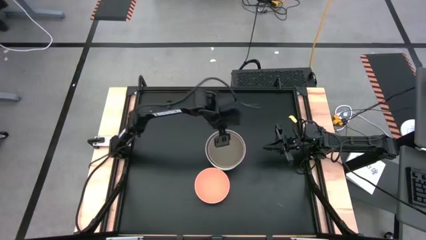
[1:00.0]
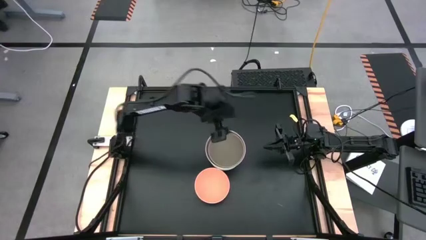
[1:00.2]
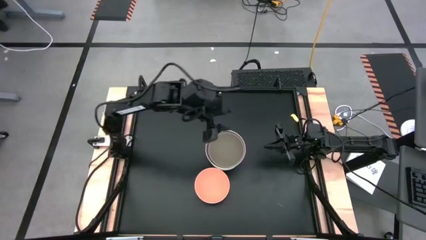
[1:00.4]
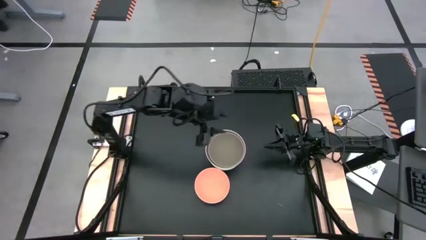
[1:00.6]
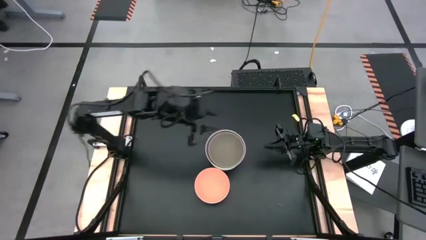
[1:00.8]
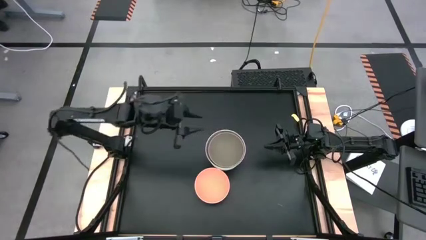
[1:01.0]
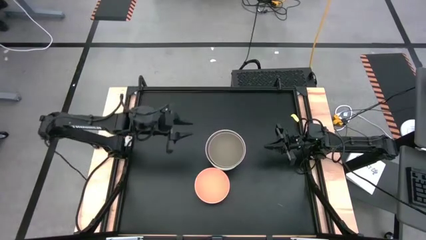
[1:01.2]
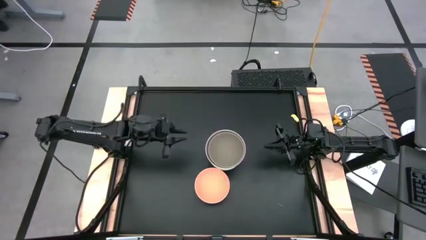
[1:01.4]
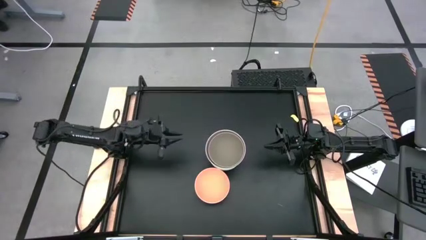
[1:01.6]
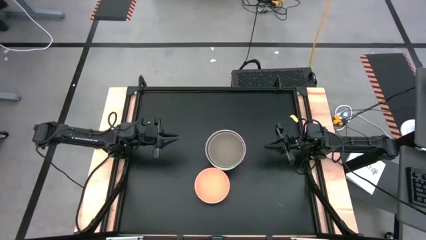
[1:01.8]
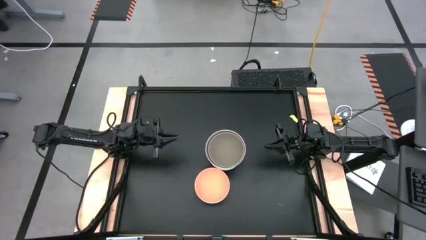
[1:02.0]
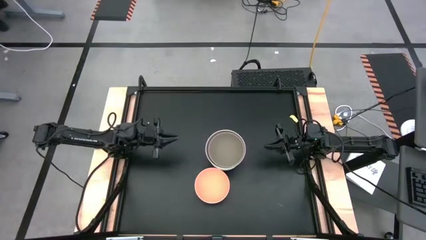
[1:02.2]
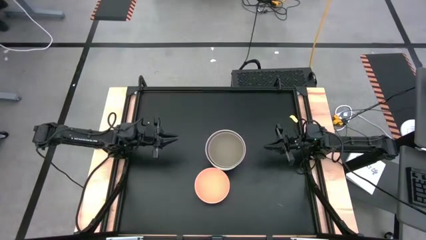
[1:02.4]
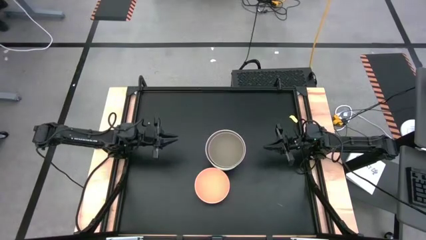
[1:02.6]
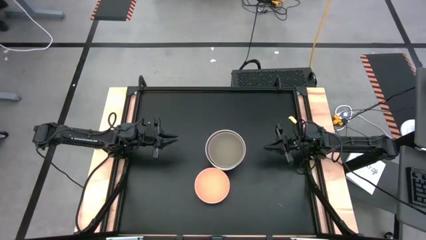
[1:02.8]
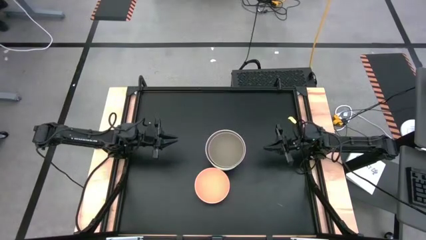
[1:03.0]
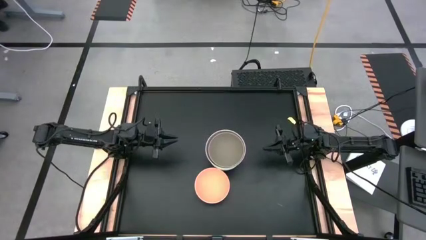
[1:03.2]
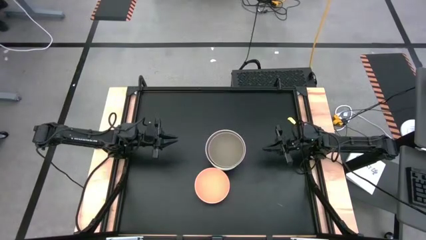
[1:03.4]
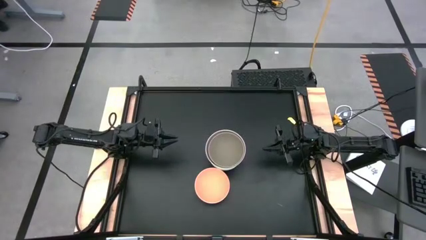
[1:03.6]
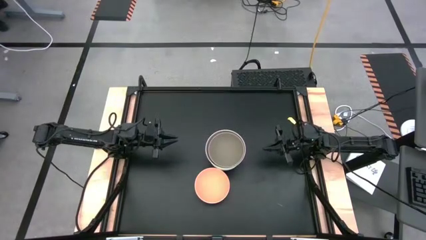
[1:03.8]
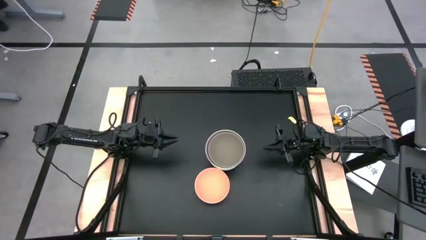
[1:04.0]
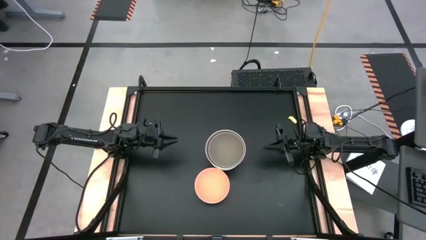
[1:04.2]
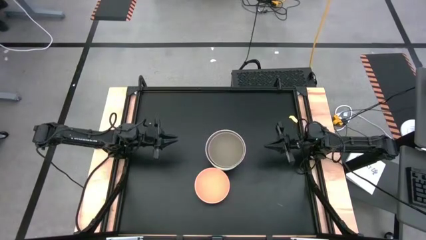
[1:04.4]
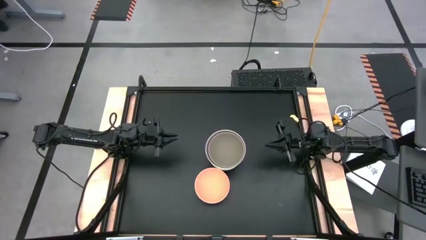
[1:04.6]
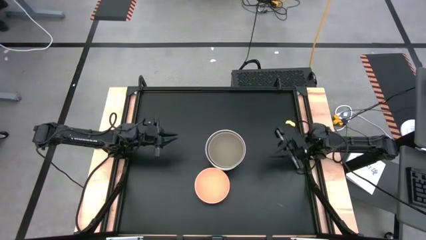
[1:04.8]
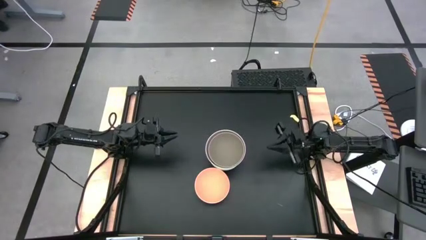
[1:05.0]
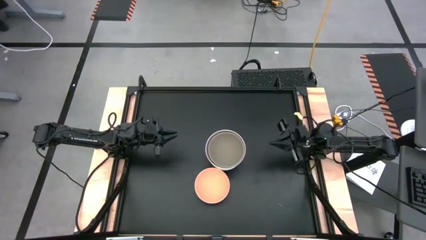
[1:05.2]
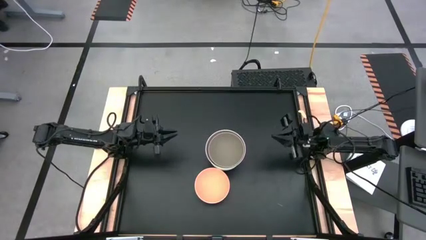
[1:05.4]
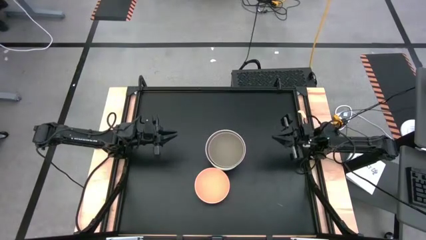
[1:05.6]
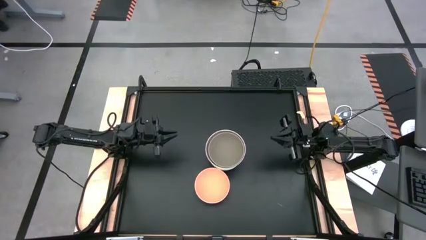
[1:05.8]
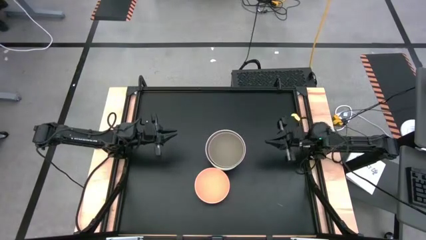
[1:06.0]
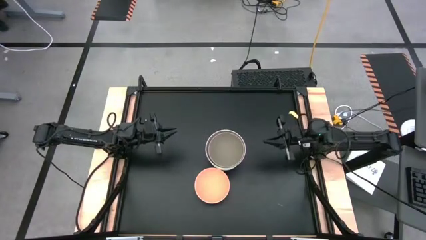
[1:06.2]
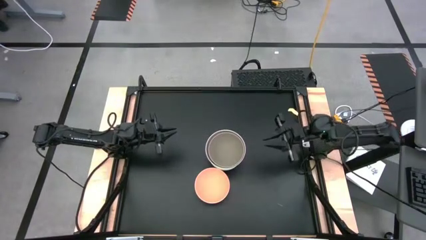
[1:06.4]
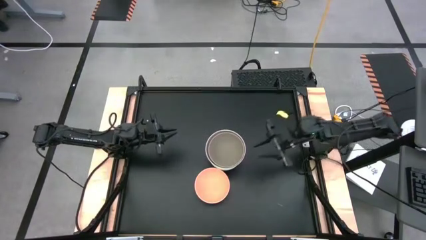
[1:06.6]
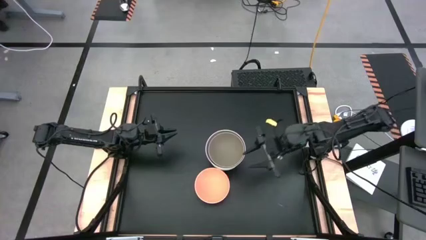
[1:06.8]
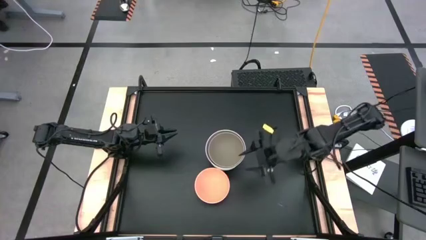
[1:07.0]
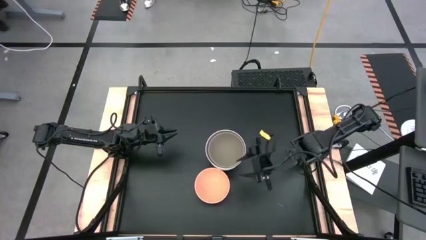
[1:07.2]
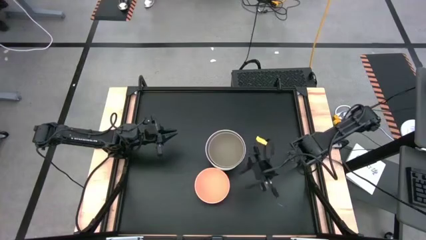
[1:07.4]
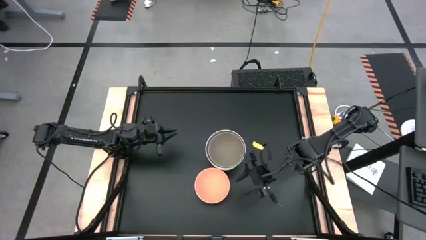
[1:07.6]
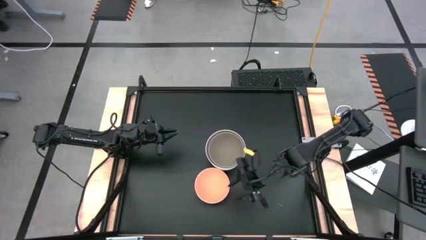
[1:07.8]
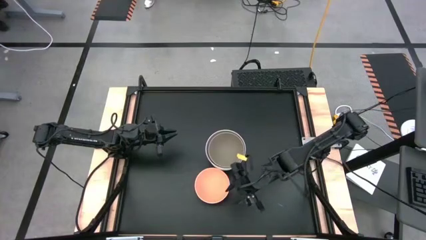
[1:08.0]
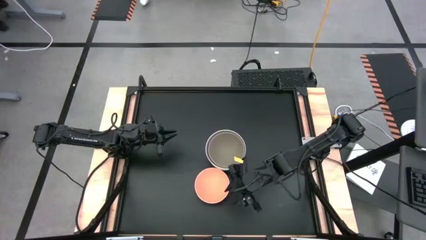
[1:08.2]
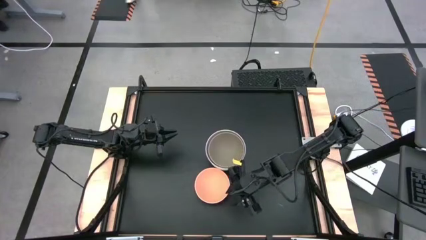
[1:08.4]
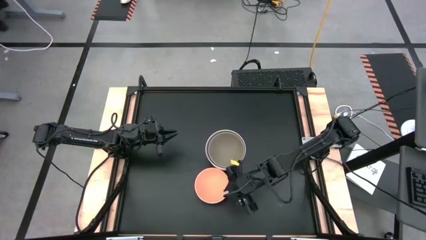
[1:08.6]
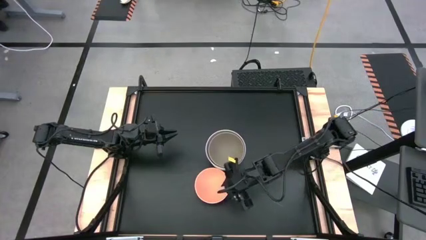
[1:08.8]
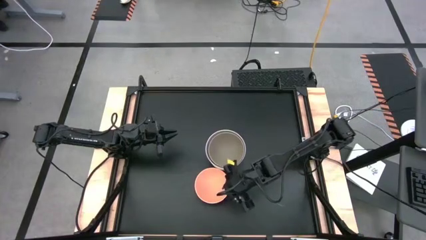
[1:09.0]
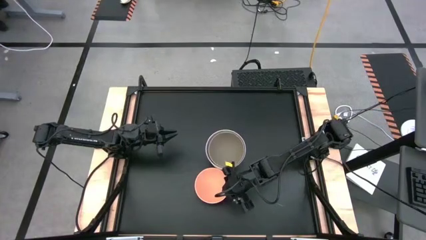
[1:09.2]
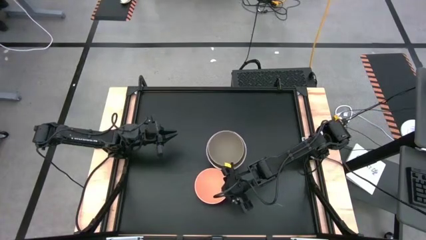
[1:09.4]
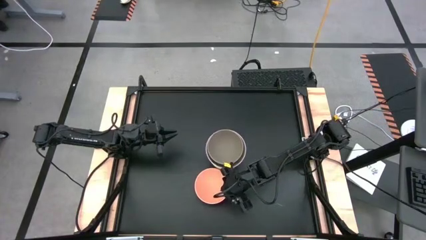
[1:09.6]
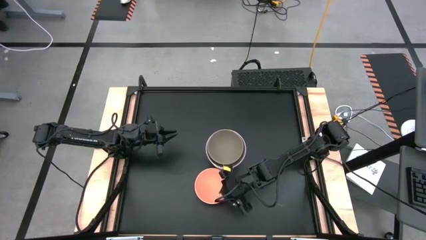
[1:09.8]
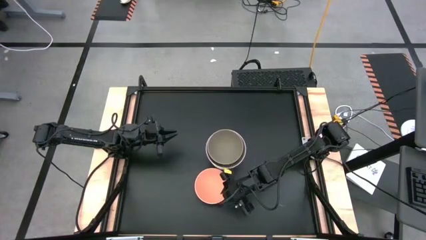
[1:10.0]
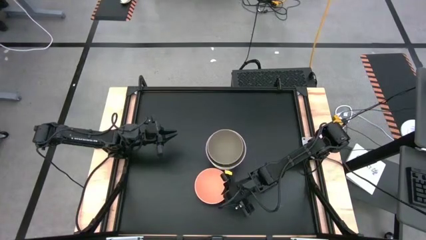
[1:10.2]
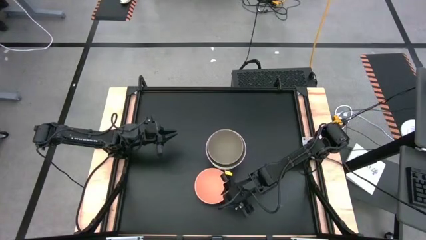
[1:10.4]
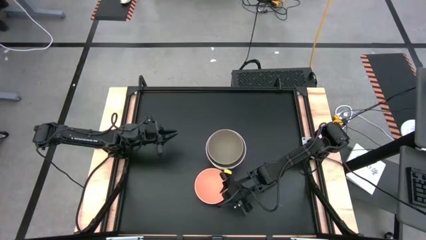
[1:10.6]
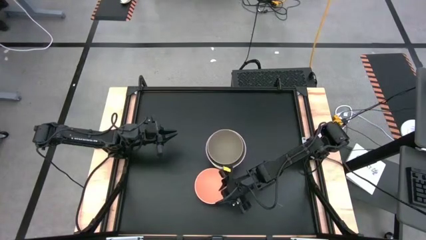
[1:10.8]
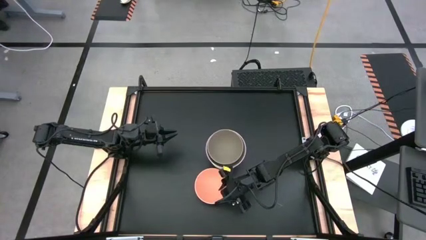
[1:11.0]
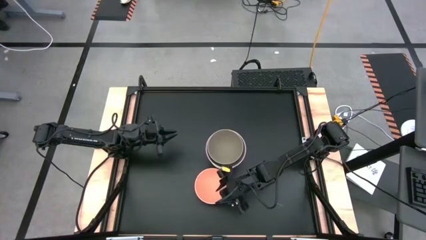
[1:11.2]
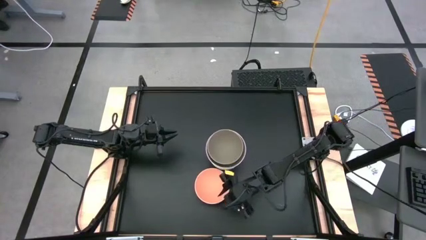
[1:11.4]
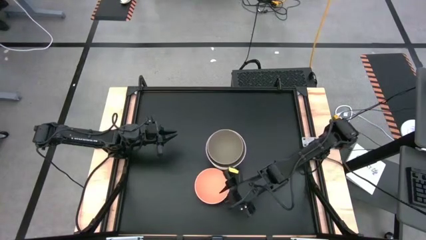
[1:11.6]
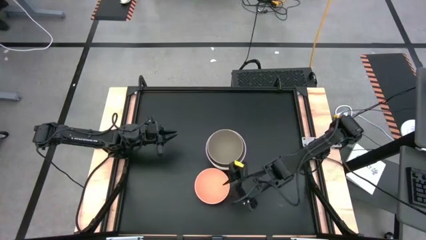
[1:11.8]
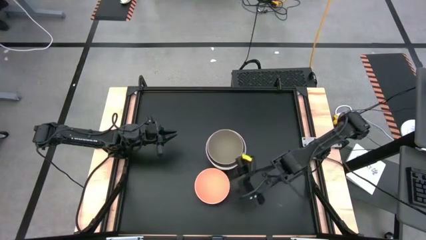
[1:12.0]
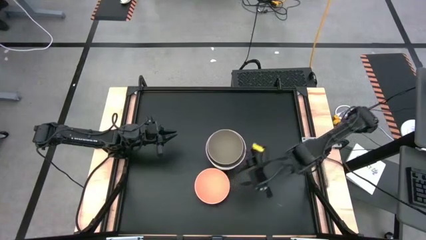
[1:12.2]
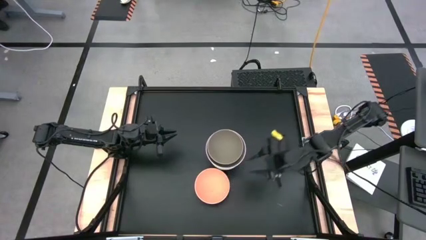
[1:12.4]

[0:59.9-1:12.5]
Task: Nest bowls inside each other
Stack the light orange bowl on the light gray bowl

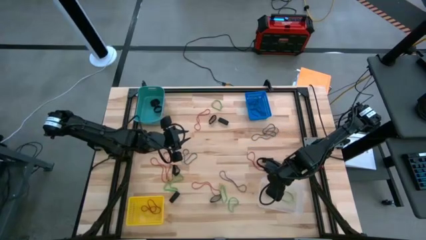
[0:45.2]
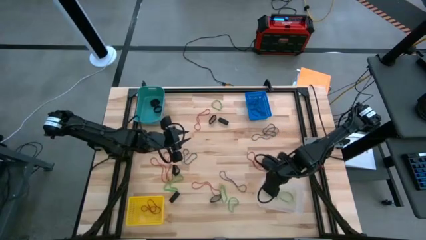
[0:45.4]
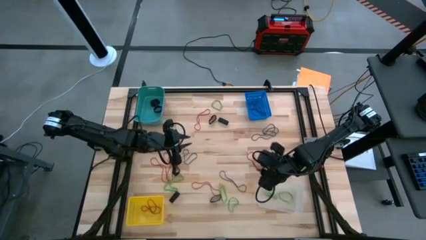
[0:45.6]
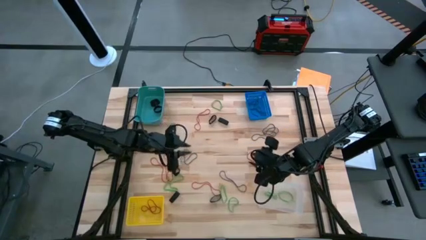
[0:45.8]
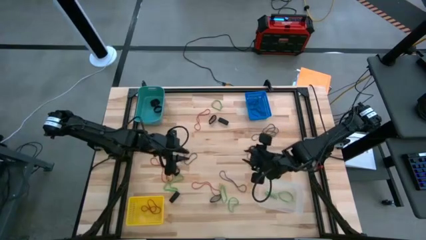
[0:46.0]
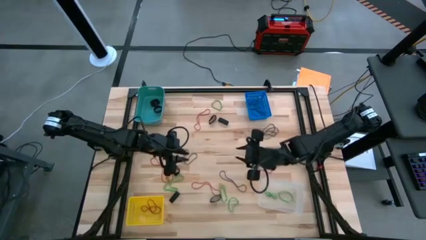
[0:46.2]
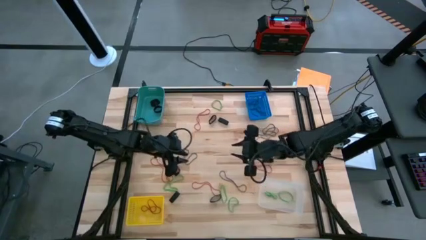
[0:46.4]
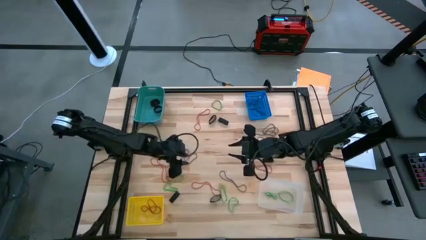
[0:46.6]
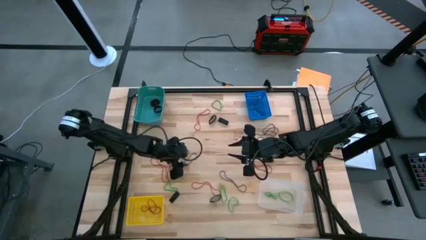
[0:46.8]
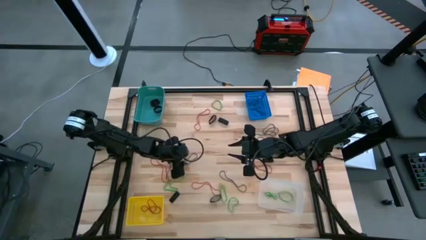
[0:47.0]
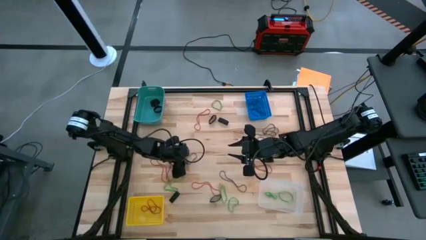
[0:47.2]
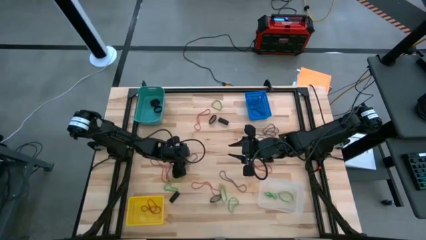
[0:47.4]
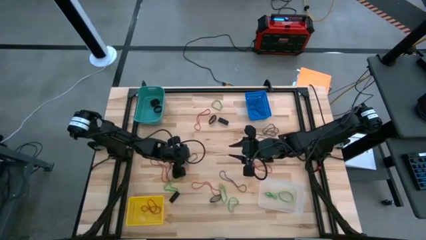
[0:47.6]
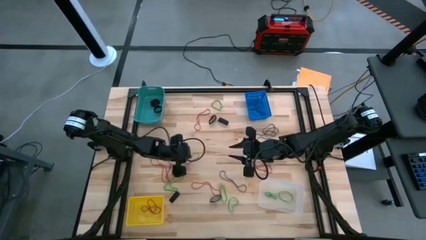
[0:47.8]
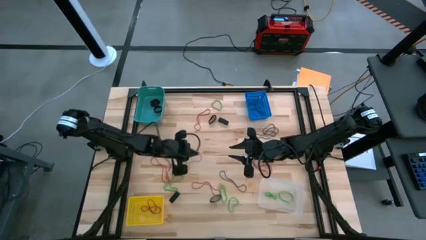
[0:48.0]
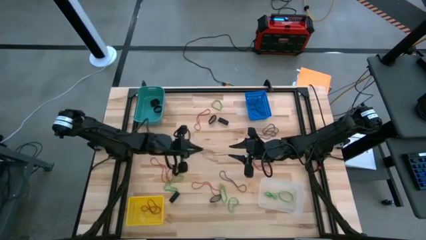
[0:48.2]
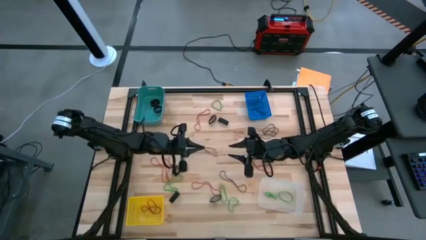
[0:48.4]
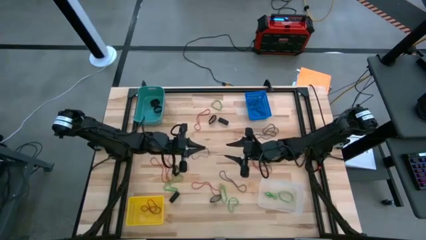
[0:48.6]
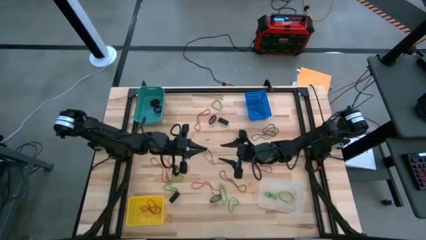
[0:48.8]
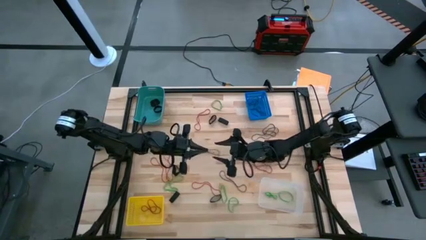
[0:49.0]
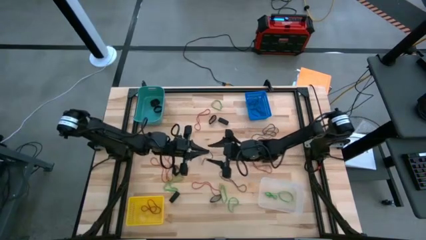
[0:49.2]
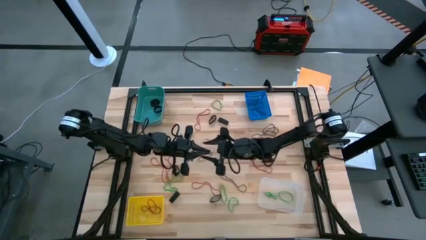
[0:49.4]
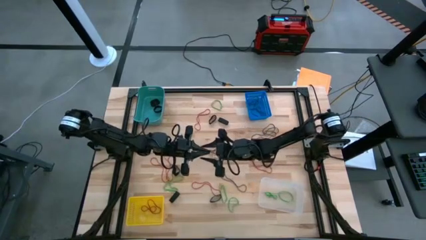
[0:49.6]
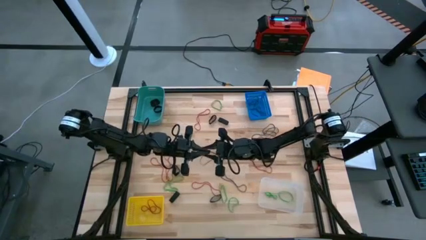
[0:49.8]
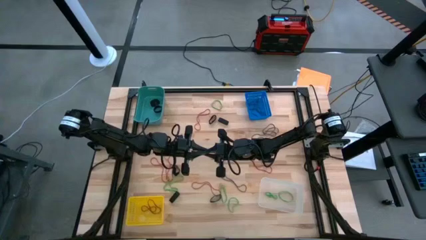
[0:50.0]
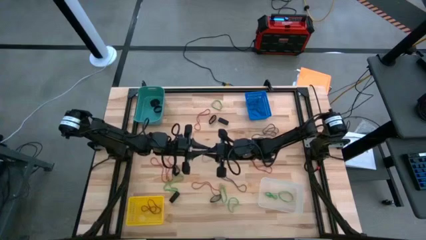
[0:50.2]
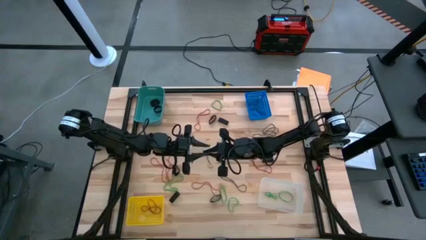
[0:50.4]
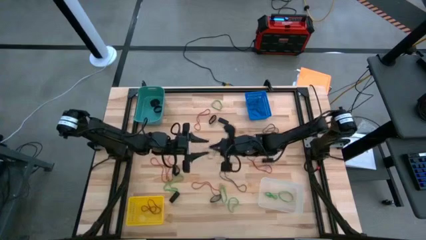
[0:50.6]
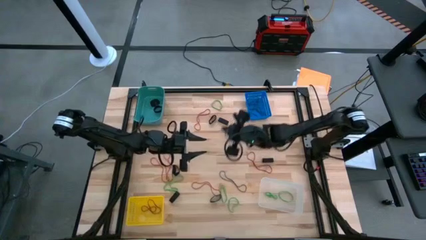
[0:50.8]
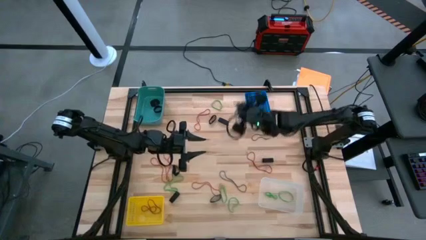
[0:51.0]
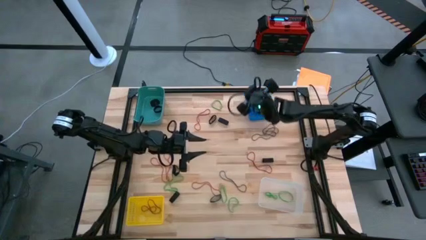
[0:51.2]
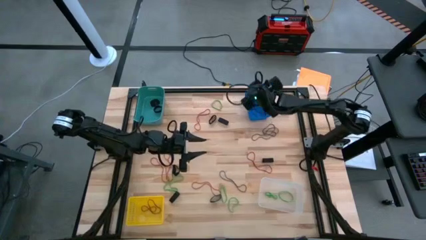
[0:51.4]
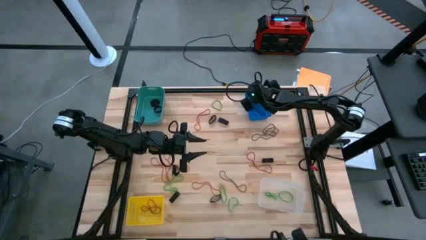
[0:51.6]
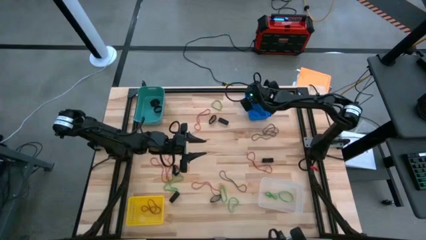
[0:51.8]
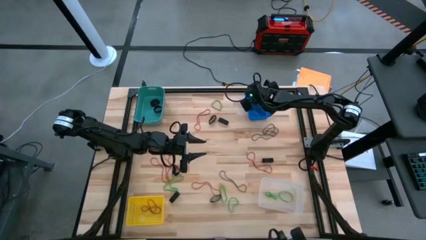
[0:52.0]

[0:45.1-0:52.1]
Task: Sort rubber bands into baskets
Put the thin black rubber band into the blue basket
